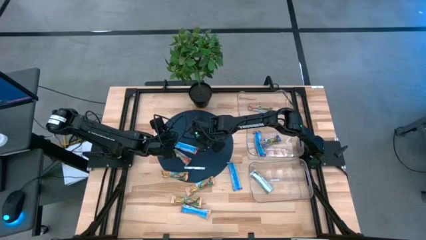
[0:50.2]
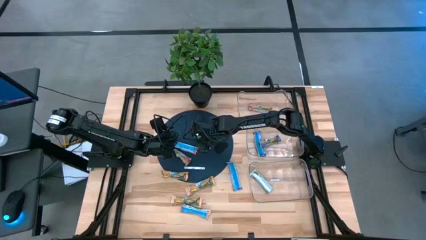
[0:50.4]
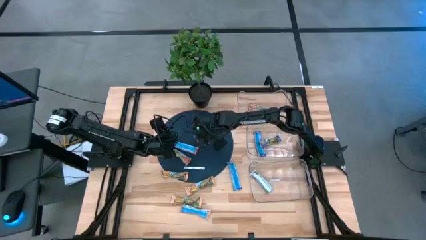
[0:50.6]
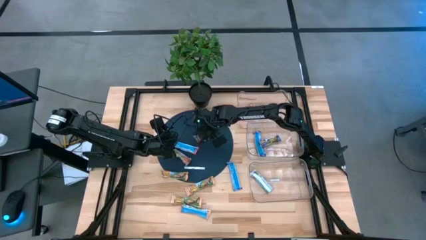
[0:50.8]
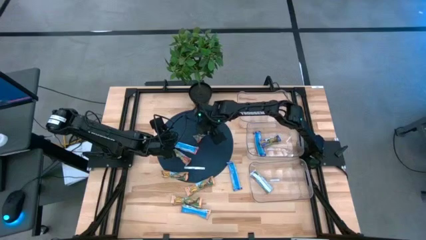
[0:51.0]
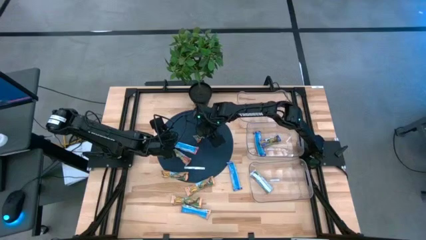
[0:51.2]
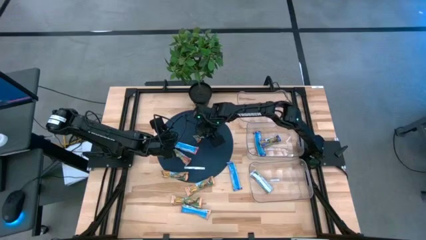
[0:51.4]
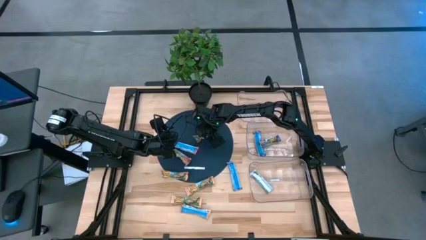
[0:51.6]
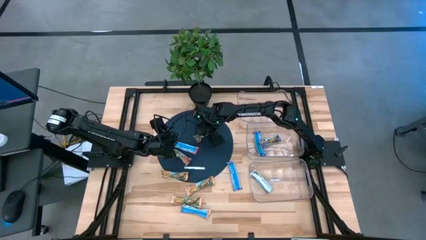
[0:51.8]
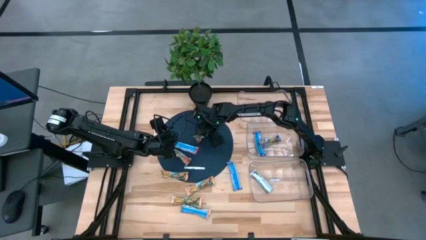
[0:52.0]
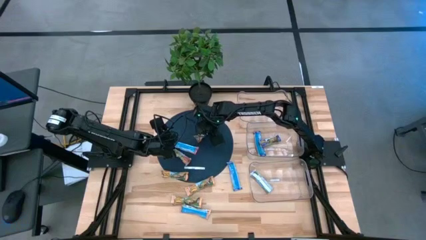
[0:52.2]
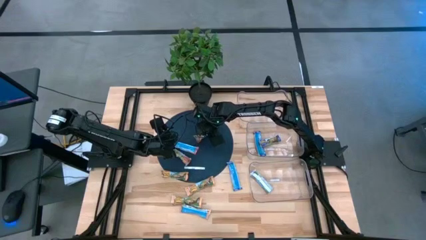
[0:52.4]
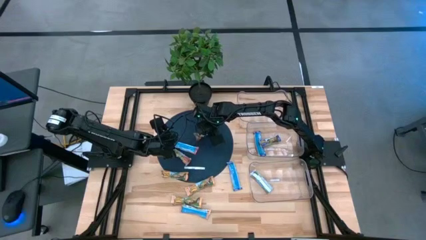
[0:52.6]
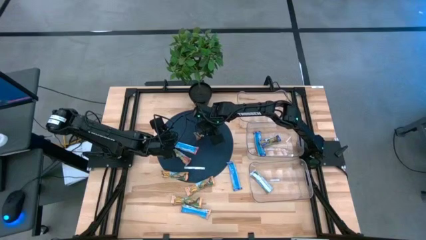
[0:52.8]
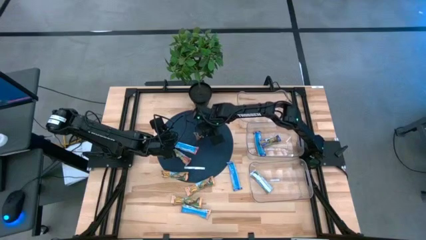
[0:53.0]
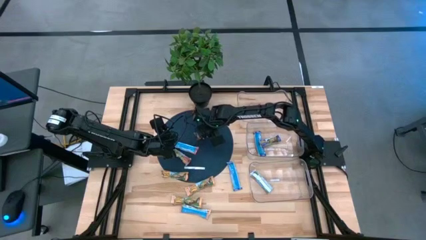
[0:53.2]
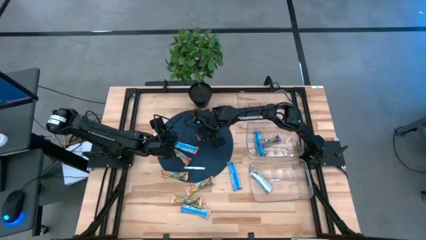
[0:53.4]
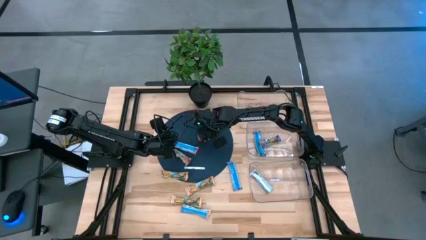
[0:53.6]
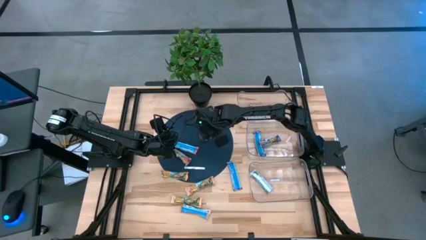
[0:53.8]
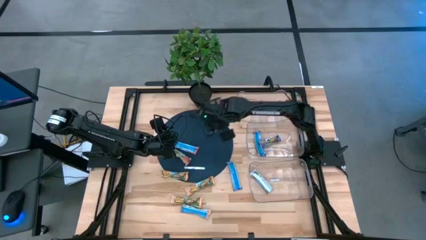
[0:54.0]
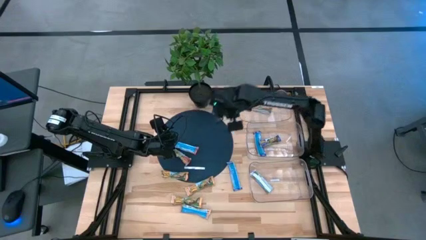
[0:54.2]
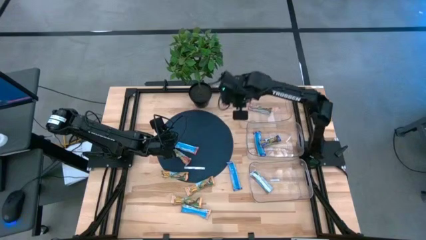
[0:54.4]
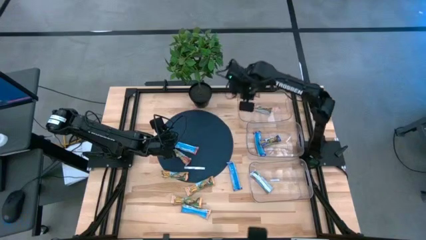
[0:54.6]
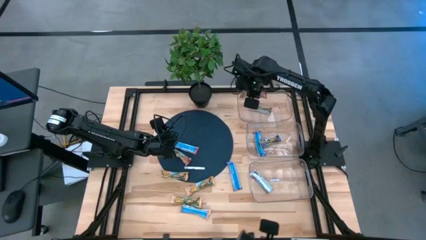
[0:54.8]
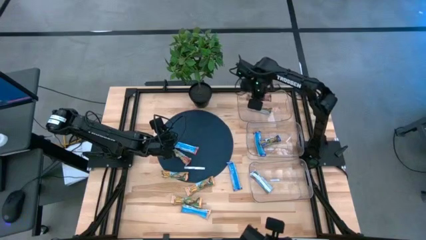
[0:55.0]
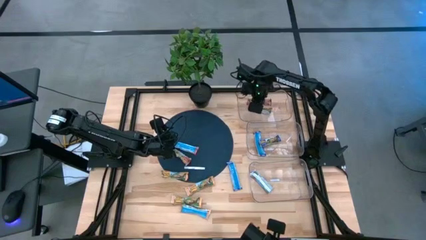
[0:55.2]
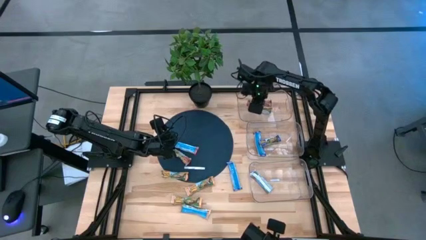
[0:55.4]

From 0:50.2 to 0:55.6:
Task: Pick and place Granola Bars by type
Put the red granola bar into the top transparent bin

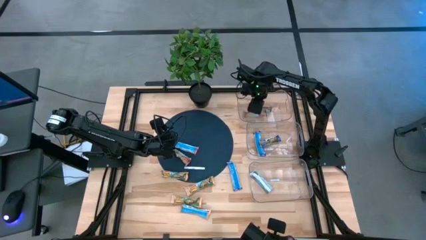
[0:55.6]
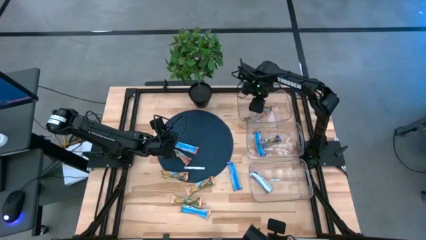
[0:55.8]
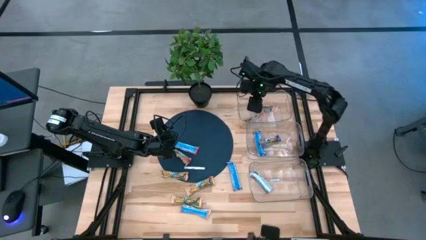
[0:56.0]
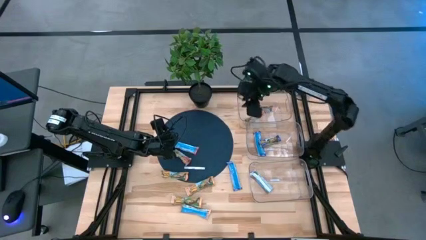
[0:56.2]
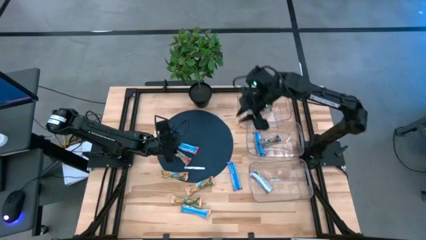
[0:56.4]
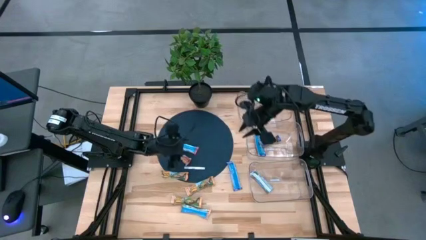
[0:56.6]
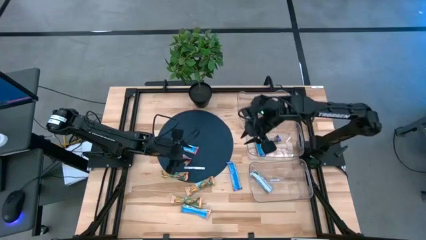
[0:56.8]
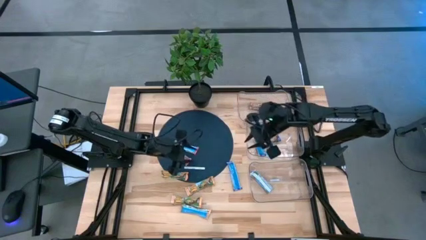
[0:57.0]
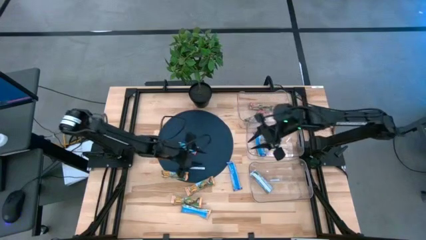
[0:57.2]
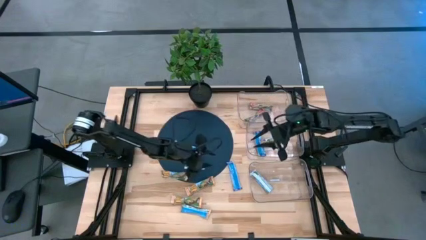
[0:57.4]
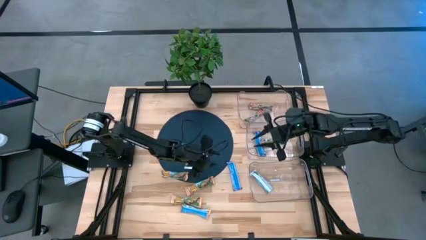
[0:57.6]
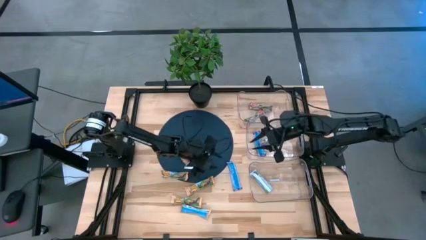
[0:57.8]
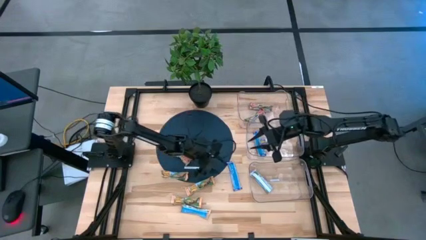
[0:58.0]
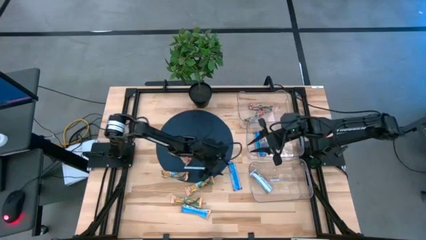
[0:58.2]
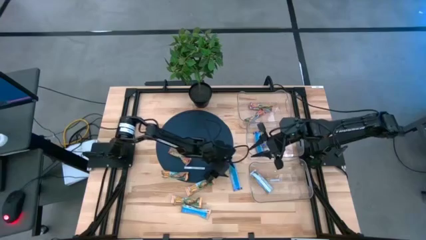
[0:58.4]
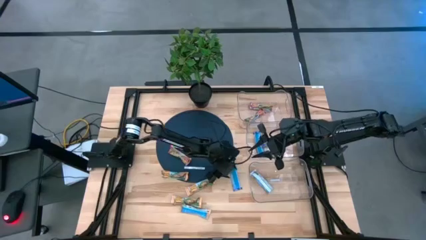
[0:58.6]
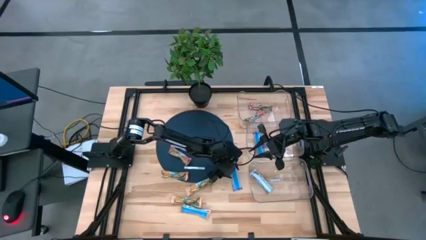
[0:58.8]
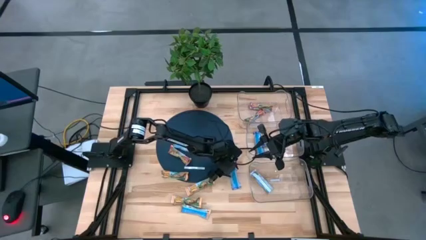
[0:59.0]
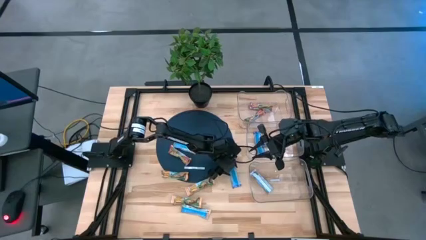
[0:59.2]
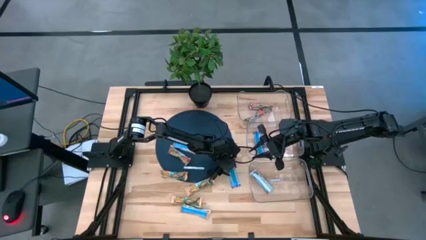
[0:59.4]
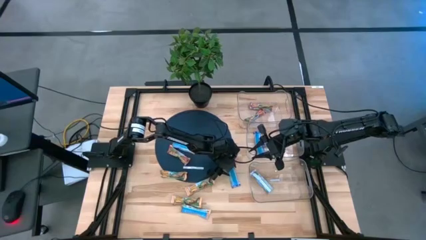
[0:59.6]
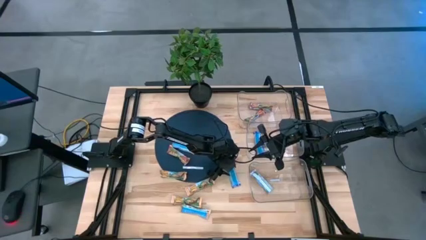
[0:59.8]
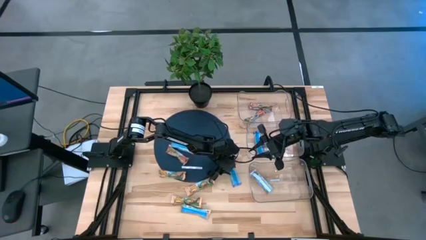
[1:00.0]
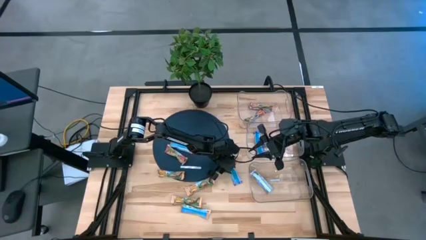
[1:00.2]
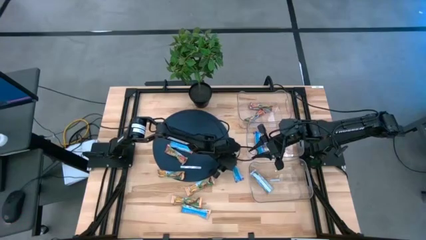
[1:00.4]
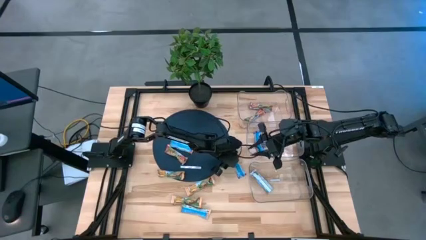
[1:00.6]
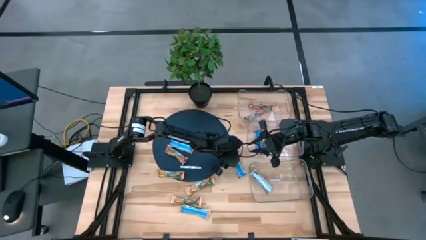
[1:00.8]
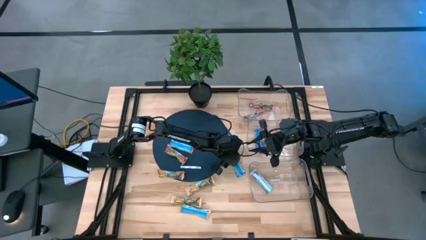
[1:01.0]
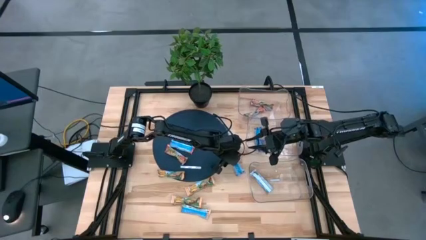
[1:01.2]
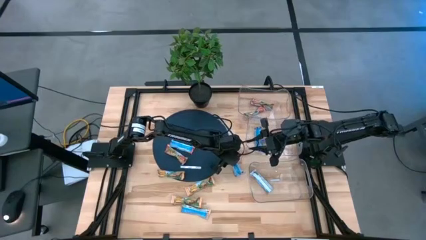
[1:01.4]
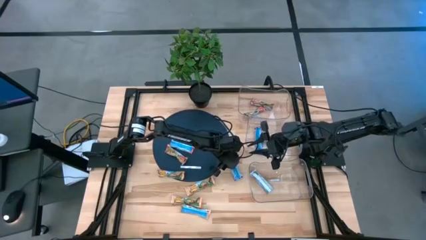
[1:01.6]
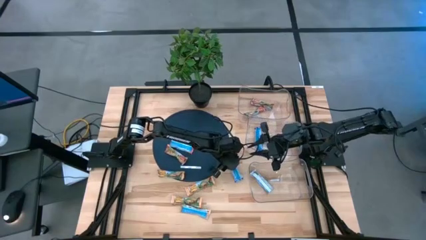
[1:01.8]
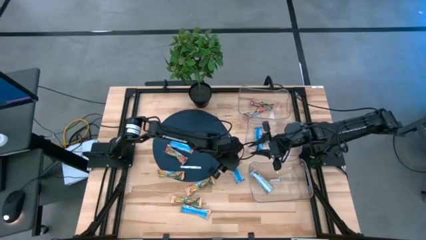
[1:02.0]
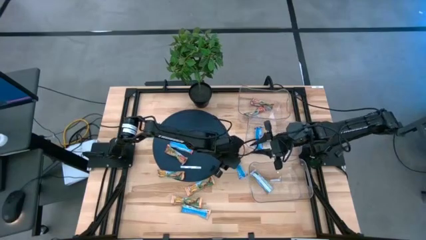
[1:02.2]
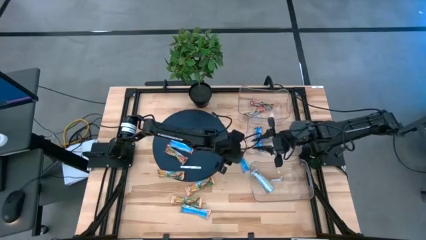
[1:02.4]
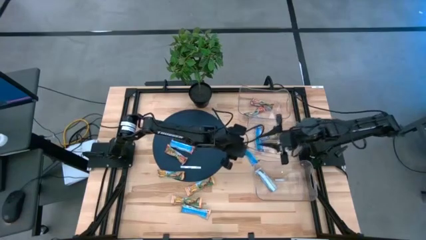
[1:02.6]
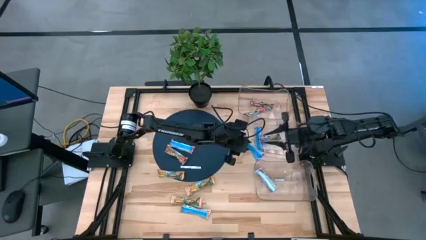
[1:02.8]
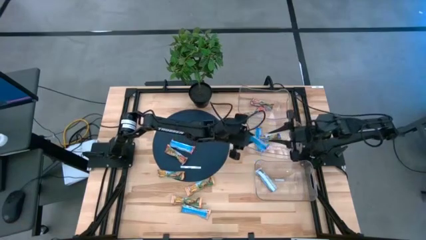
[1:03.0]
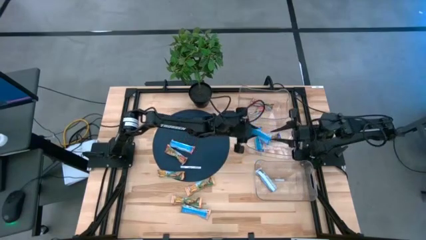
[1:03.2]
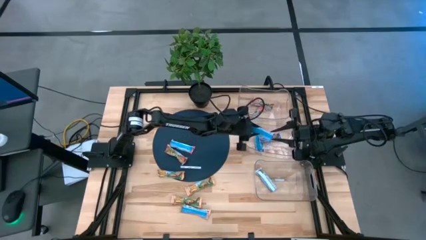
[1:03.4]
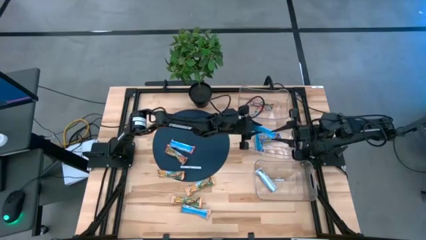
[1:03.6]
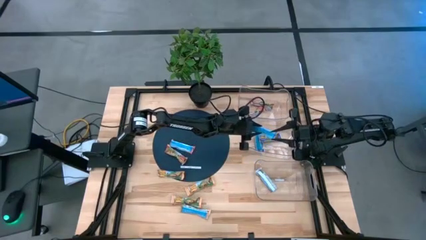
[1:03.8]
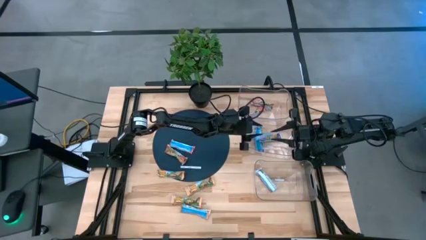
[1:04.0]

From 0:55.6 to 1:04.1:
Put the blue granola bar into the middle transparent bin

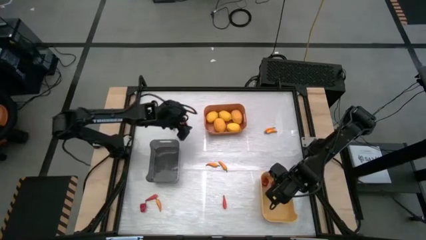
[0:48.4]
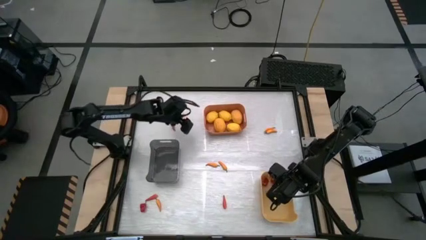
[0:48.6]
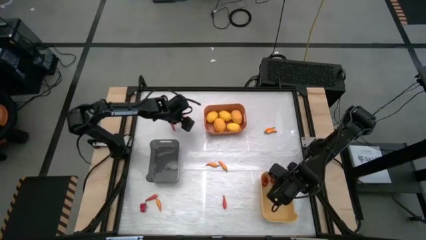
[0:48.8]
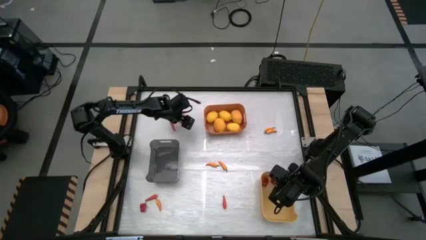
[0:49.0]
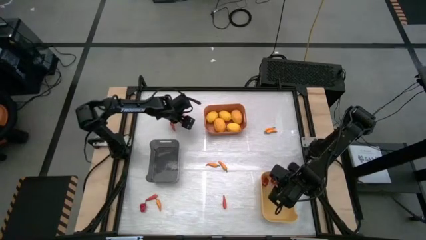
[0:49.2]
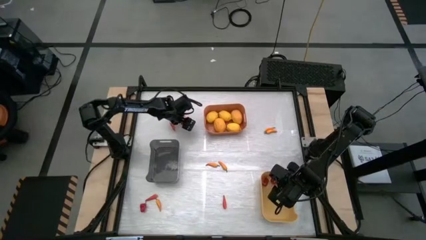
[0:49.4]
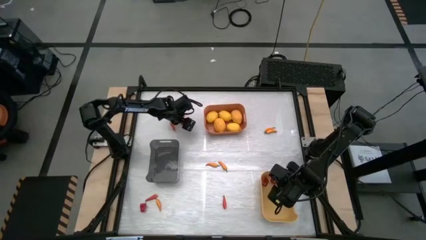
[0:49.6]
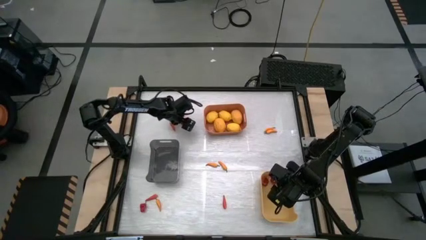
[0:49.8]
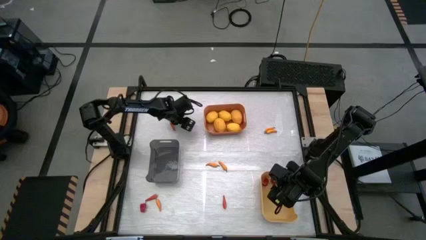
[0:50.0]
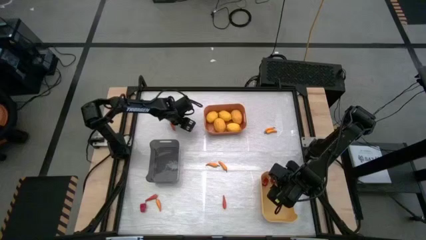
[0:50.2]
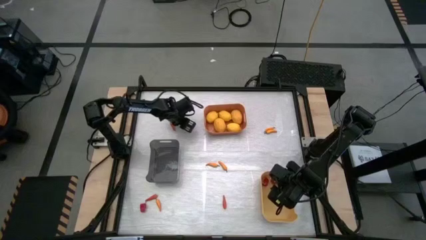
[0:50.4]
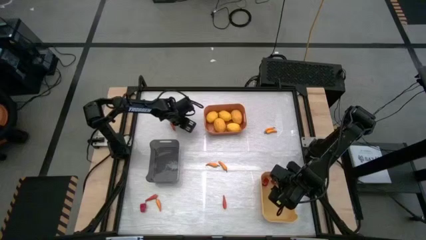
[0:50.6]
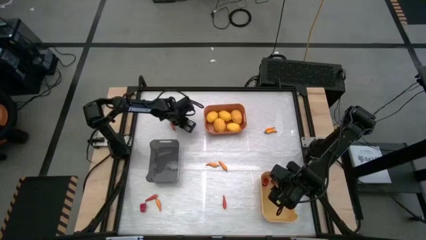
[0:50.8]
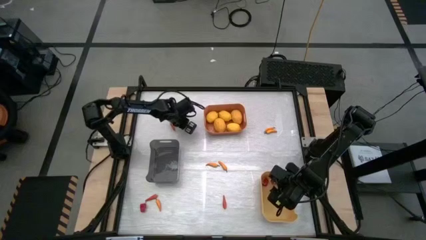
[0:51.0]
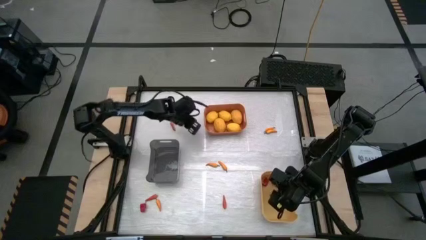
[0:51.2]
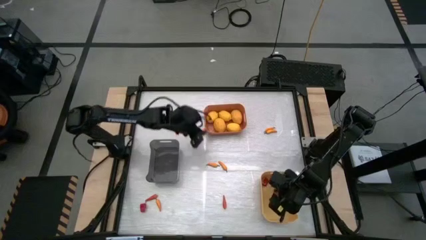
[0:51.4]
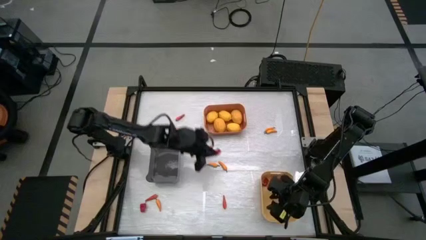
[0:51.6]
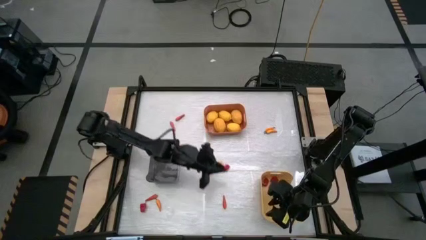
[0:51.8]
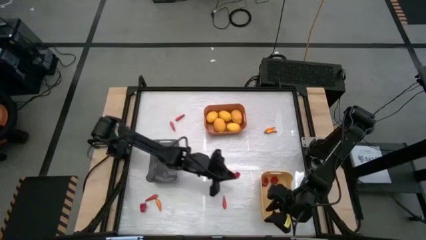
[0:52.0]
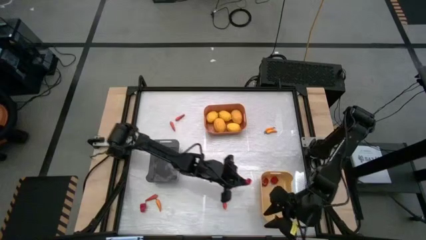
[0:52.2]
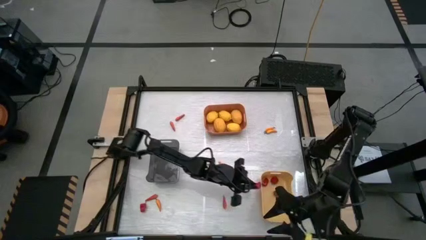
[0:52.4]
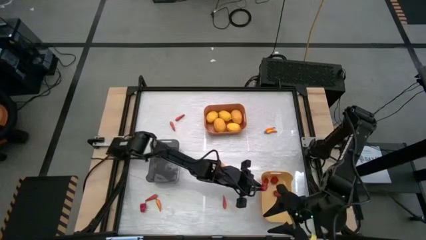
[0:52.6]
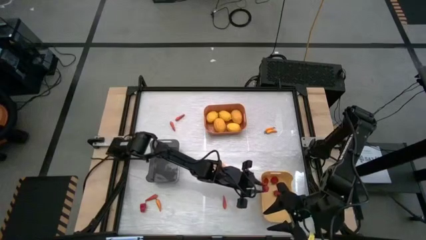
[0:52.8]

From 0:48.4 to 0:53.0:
Task: Sort produce into baskets
Put the red chili pepper into the yellow bin
